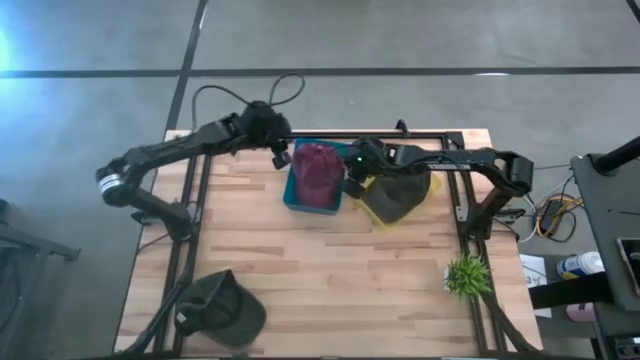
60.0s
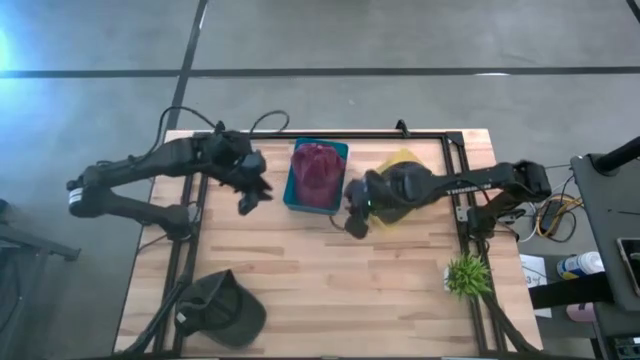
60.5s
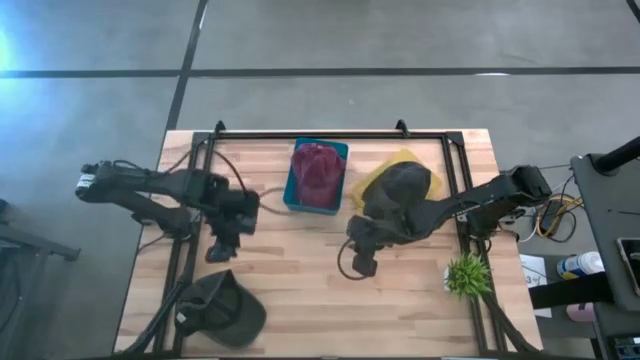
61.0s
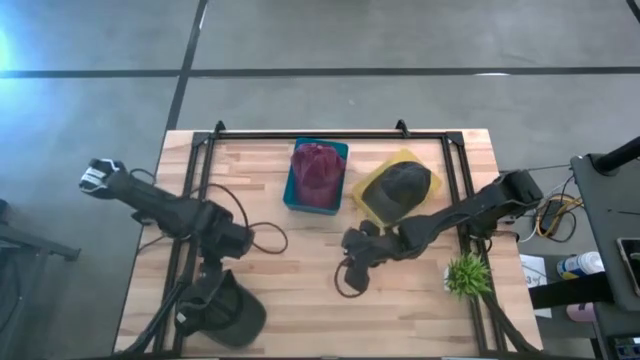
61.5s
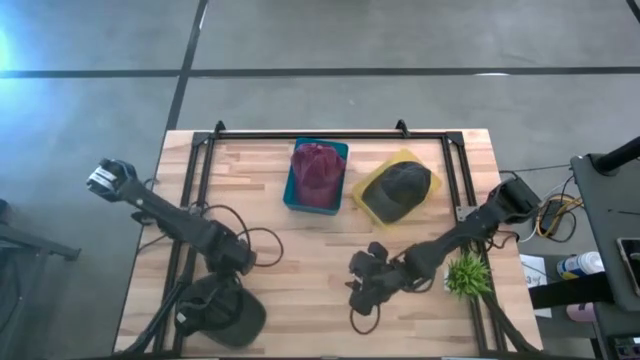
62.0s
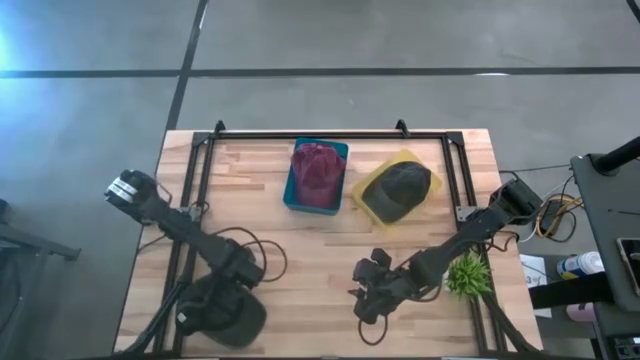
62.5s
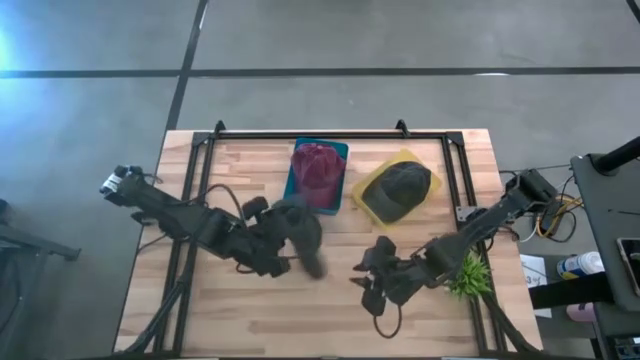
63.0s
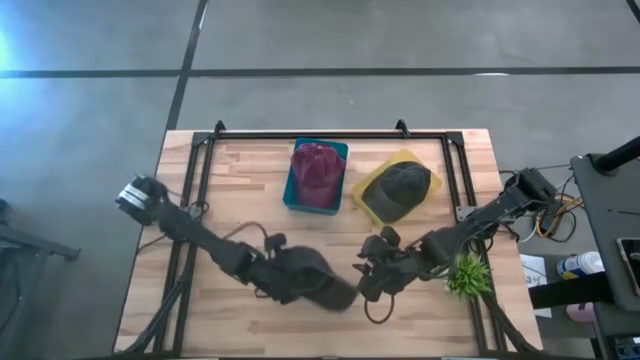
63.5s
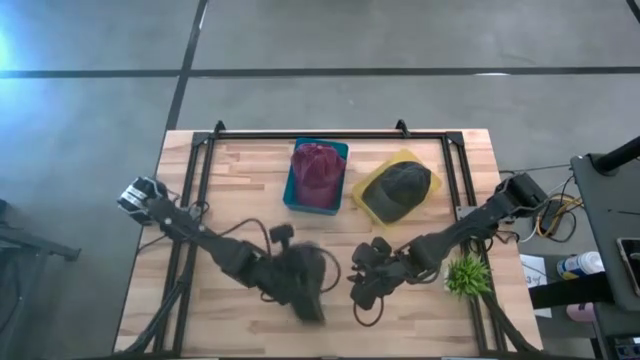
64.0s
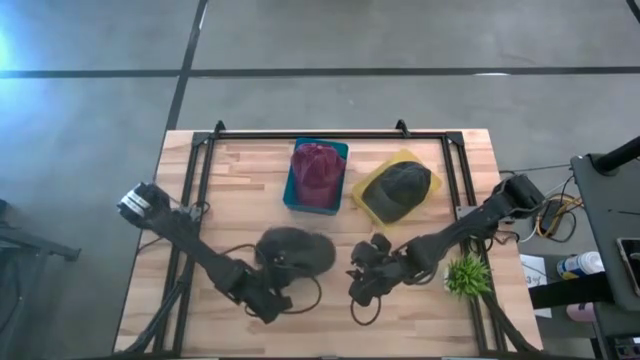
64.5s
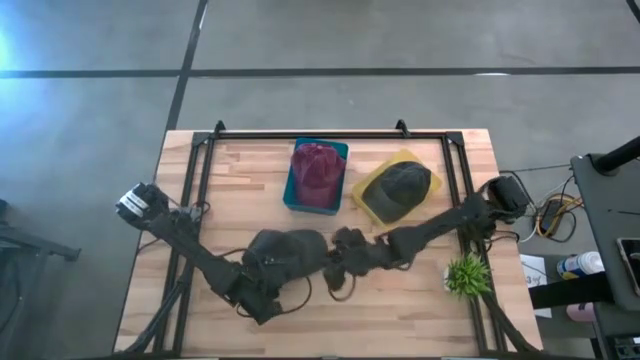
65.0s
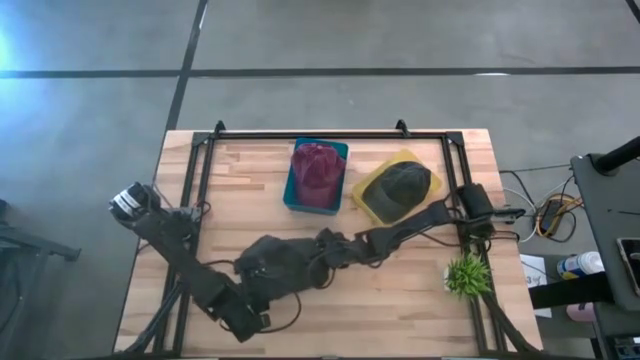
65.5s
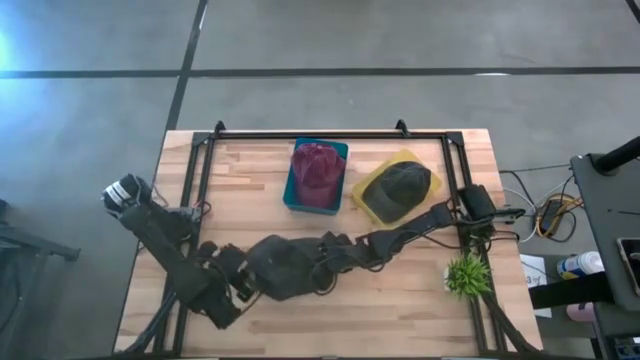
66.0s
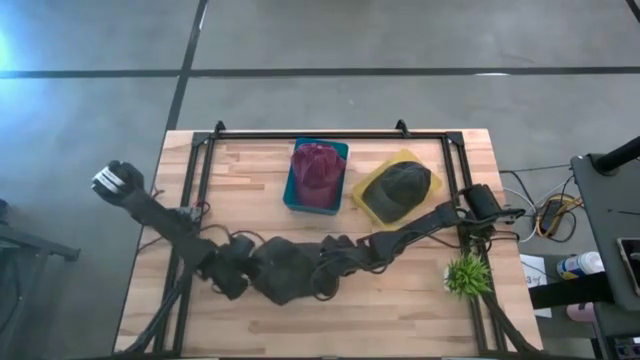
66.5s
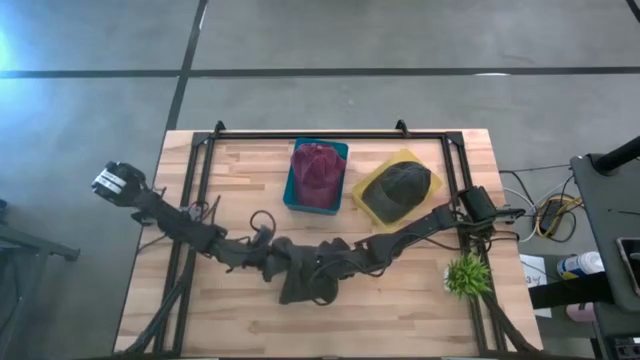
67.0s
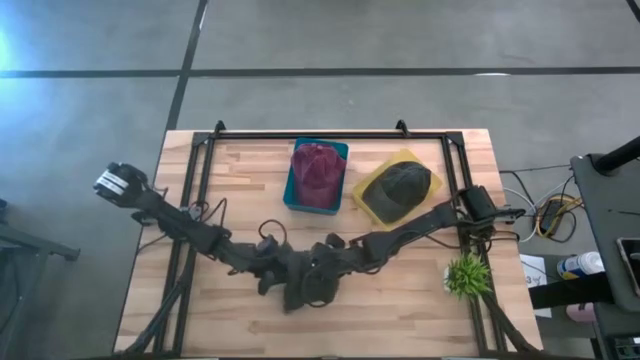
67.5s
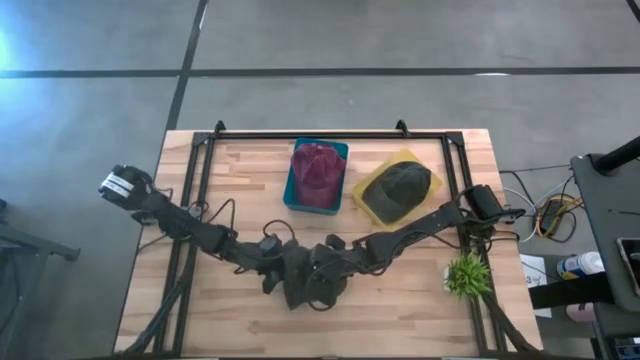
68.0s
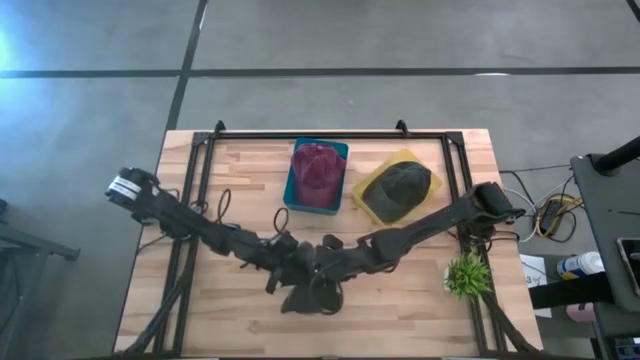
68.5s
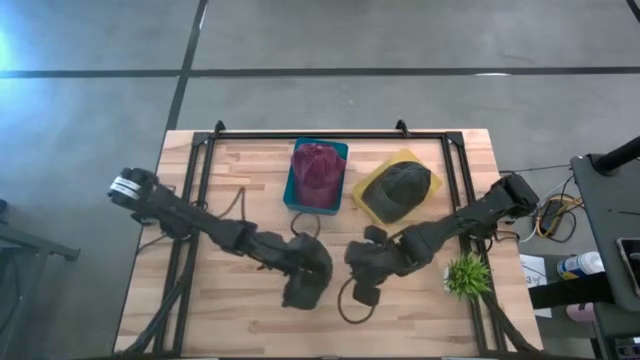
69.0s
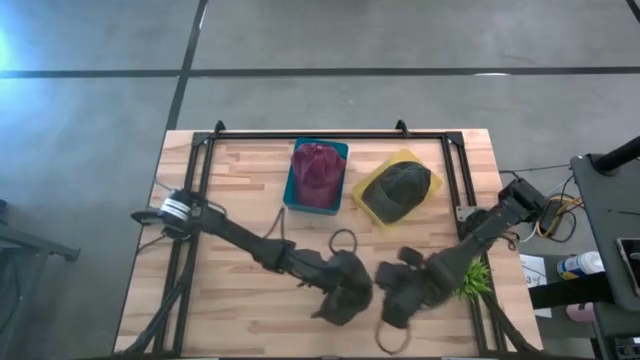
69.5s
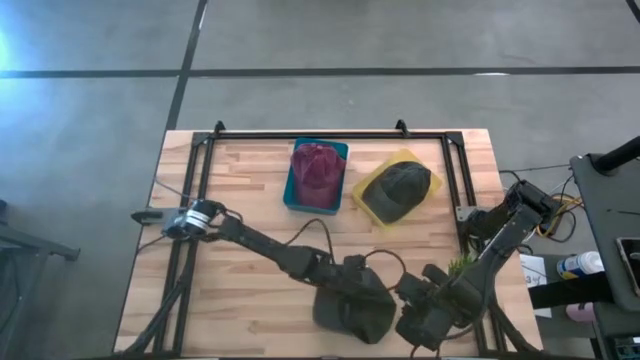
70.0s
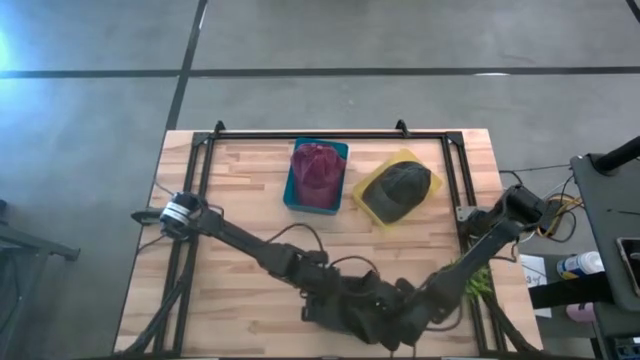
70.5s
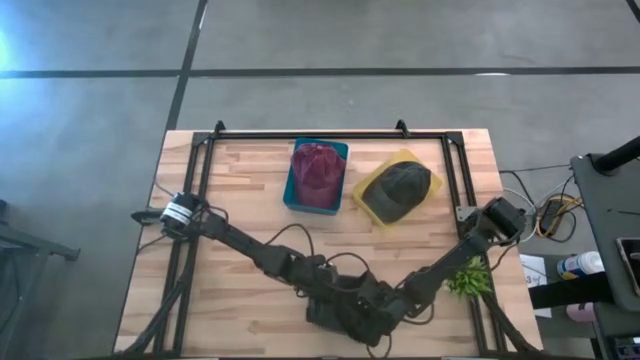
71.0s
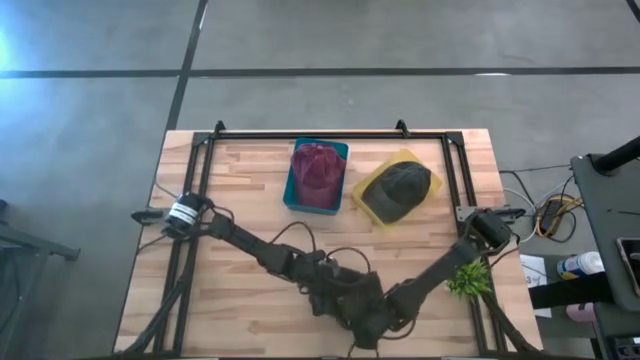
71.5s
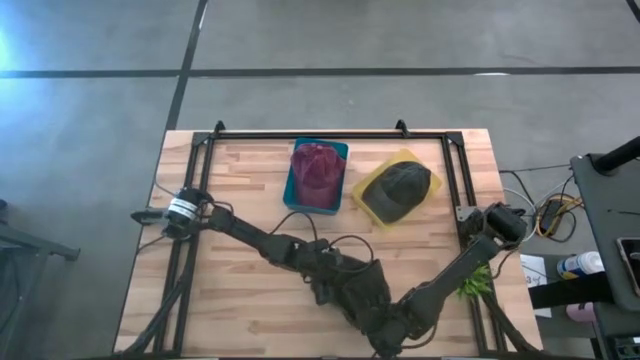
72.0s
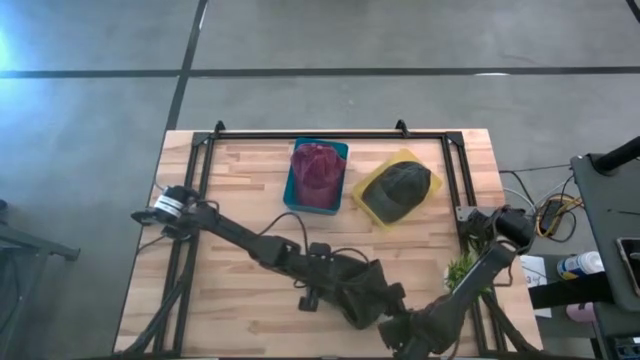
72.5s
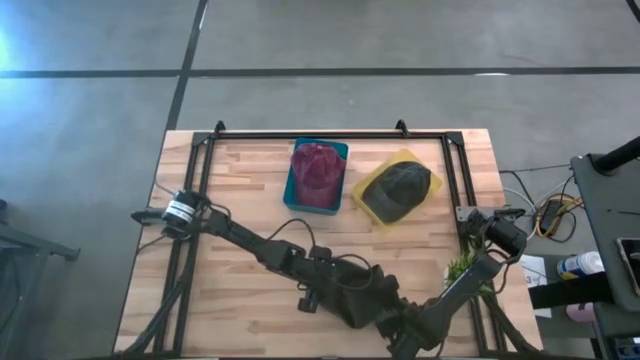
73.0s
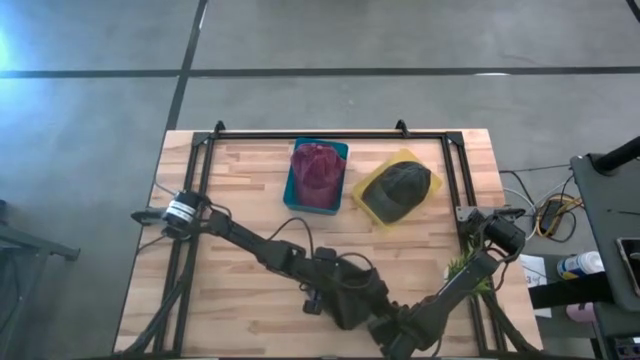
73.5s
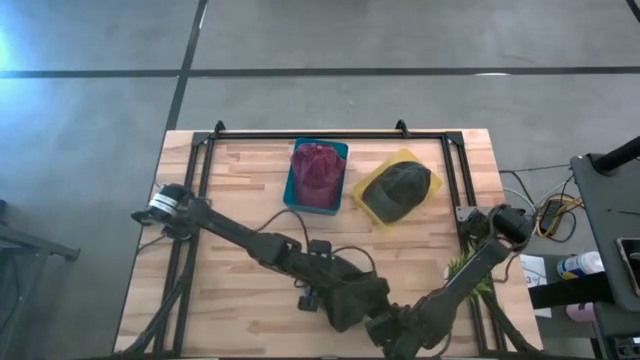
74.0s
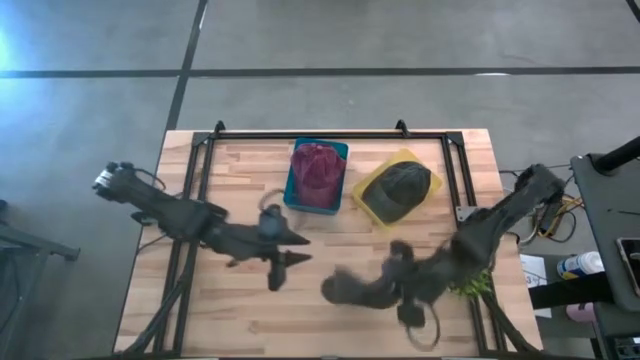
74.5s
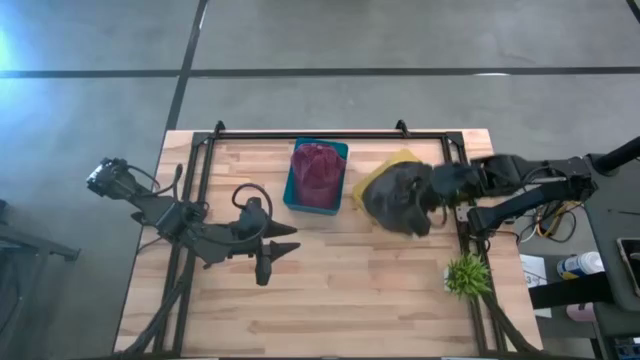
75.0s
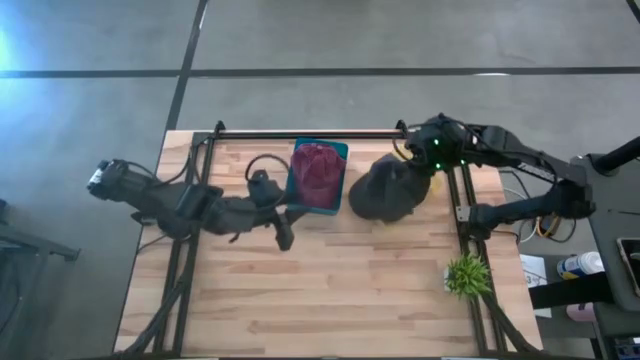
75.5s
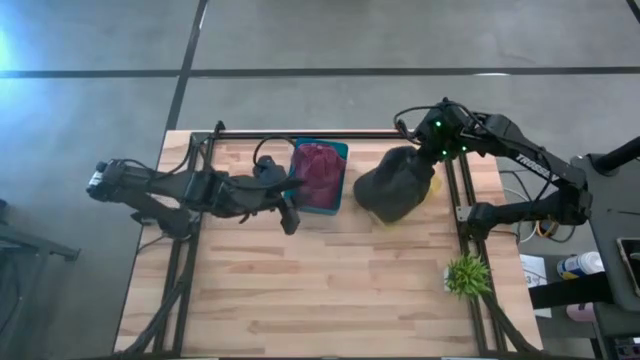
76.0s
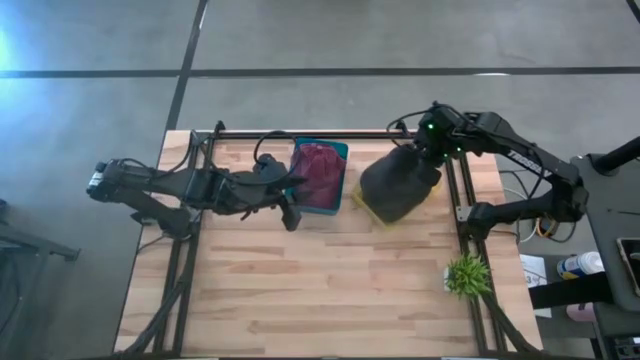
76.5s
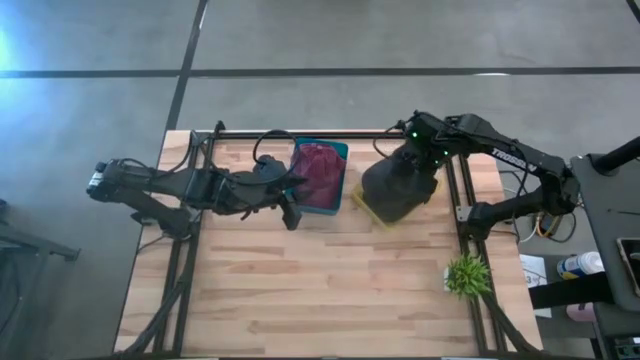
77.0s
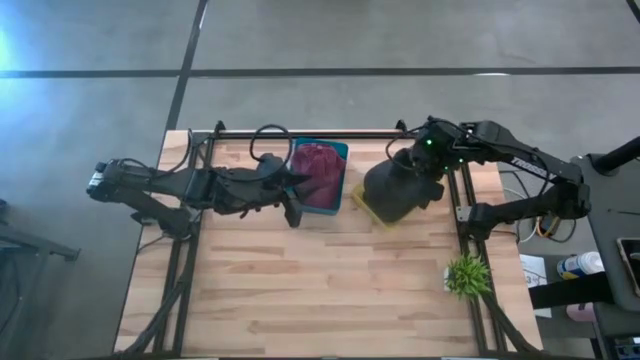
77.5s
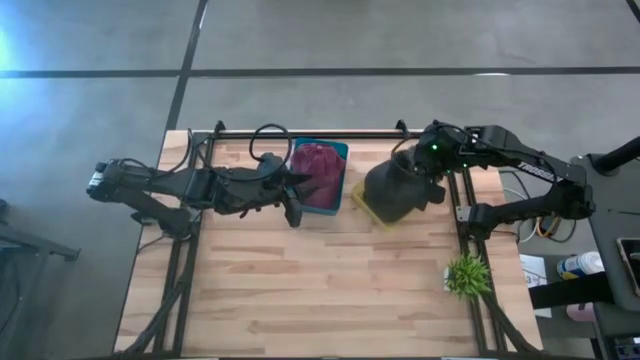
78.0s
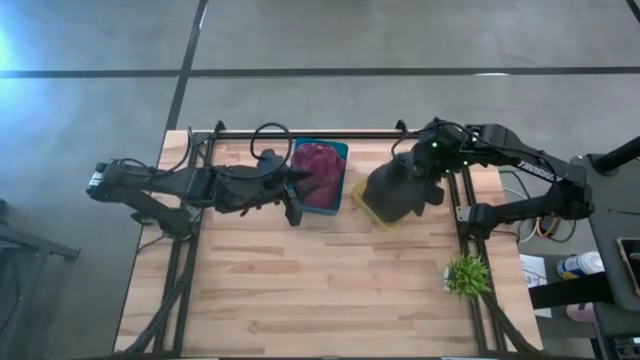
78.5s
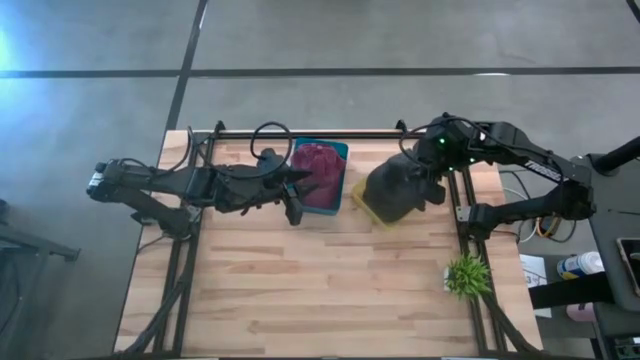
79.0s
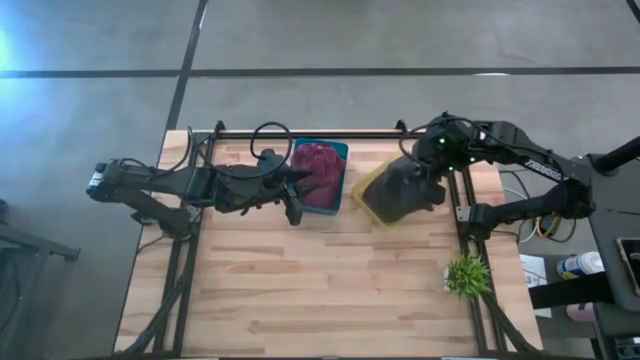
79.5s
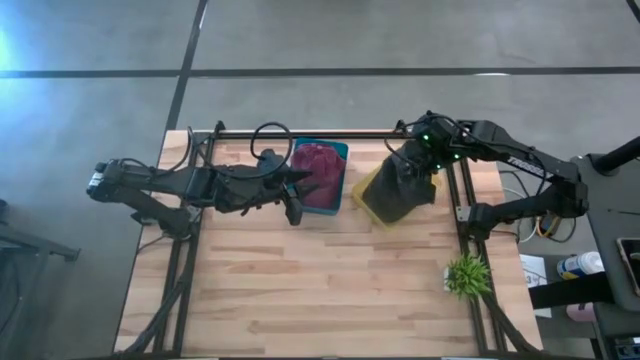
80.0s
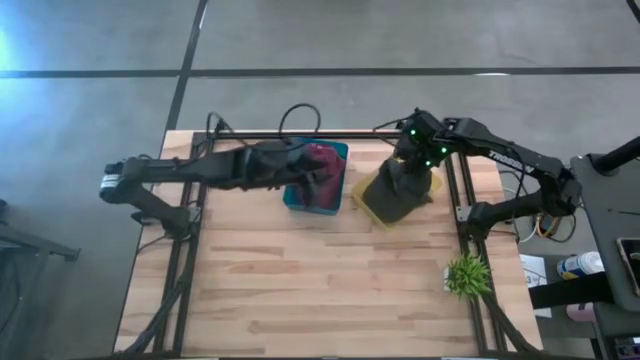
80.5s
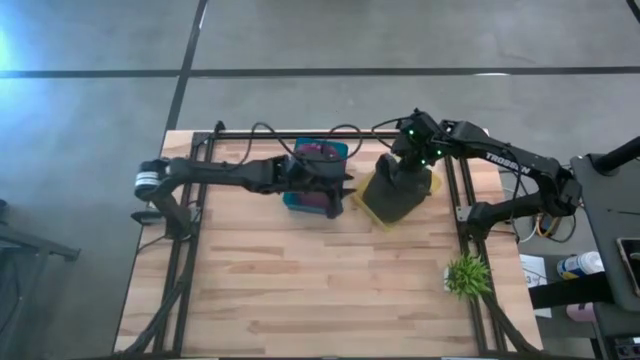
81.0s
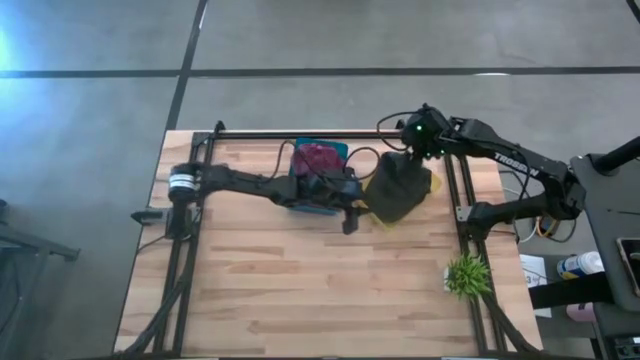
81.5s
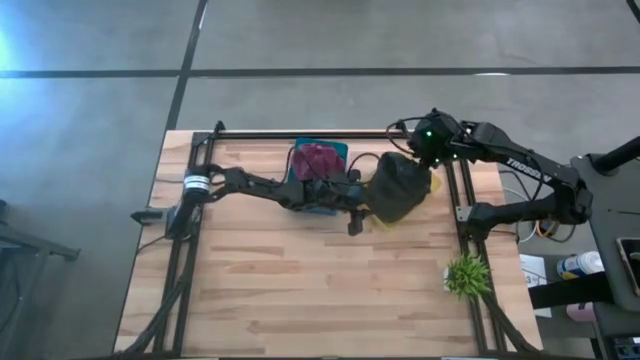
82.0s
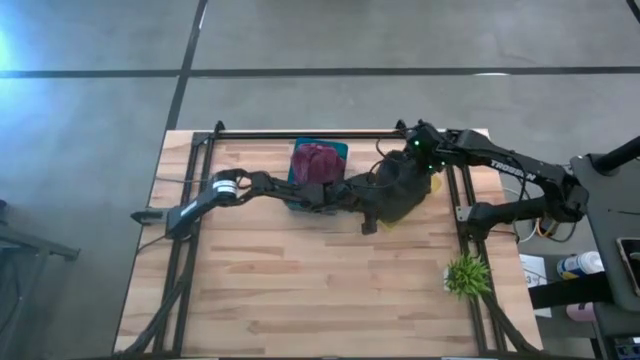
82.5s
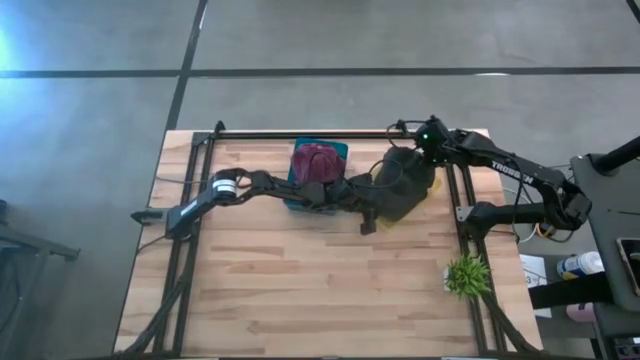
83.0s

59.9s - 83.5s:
Task: Pick & Place hat
Put the black cap into the yellow bin
